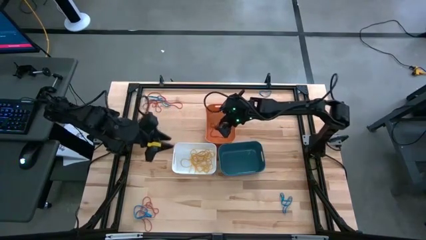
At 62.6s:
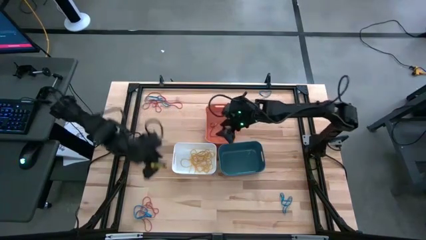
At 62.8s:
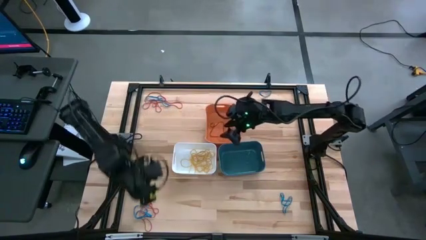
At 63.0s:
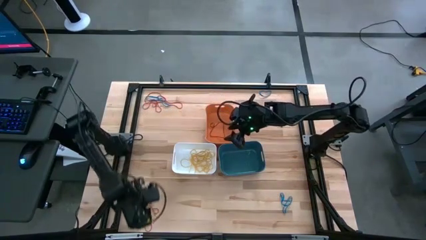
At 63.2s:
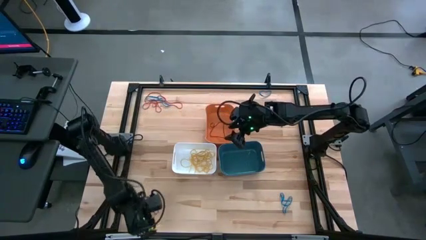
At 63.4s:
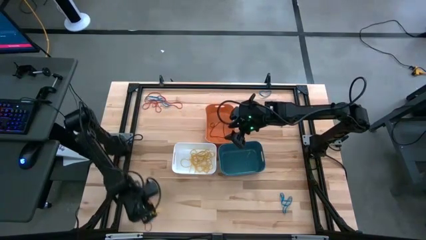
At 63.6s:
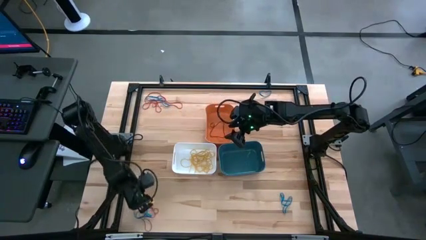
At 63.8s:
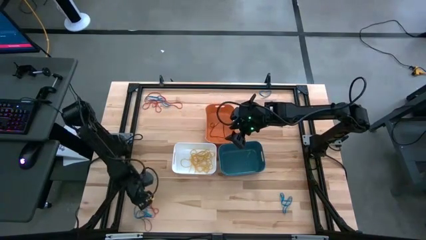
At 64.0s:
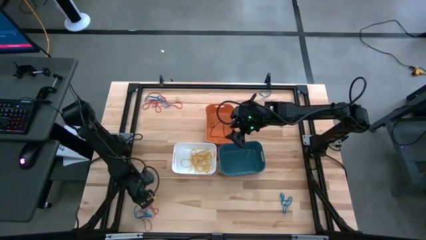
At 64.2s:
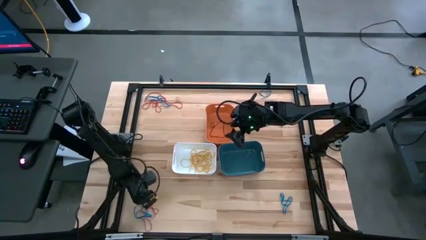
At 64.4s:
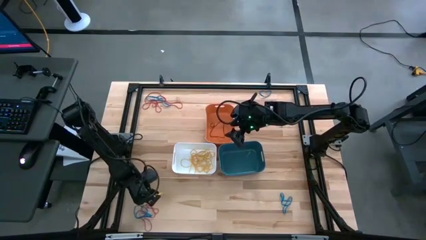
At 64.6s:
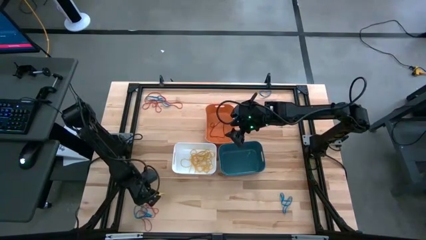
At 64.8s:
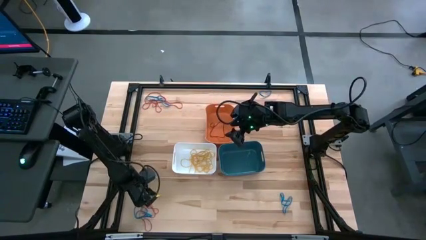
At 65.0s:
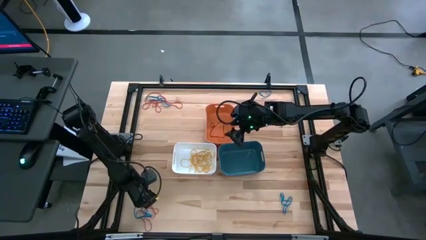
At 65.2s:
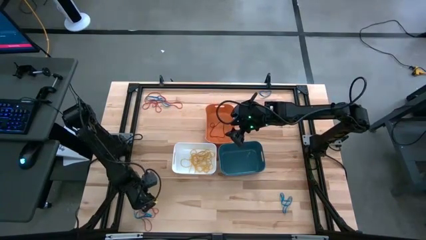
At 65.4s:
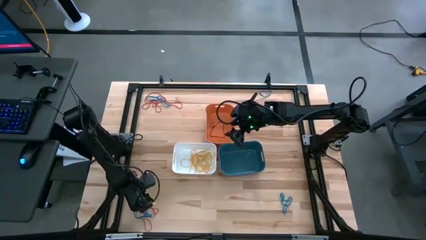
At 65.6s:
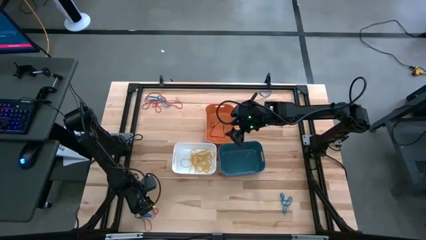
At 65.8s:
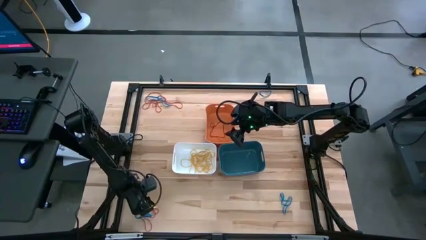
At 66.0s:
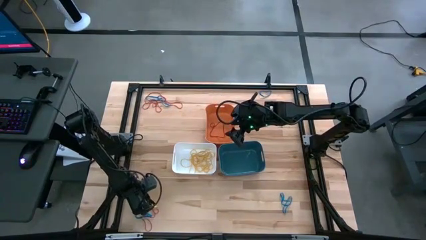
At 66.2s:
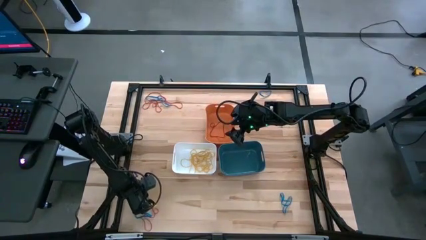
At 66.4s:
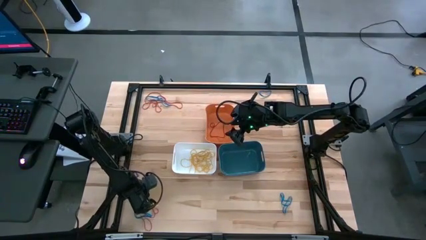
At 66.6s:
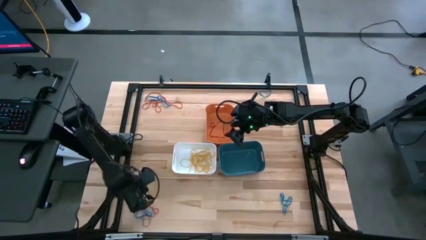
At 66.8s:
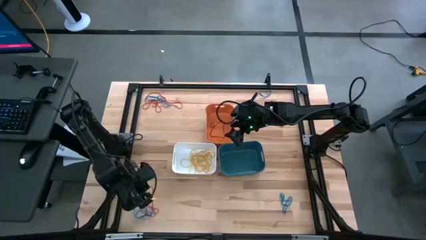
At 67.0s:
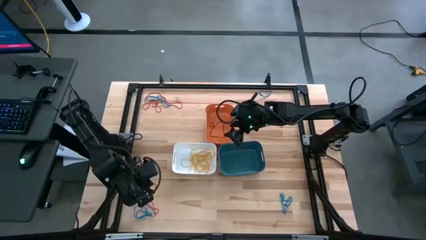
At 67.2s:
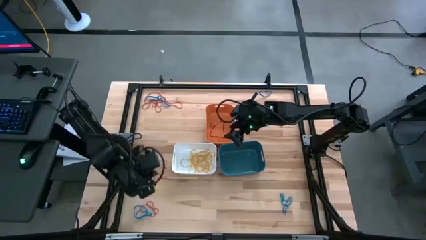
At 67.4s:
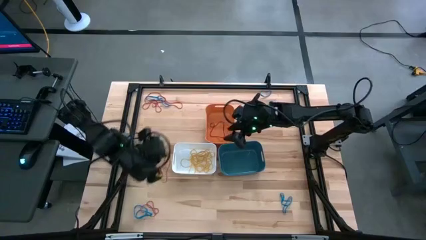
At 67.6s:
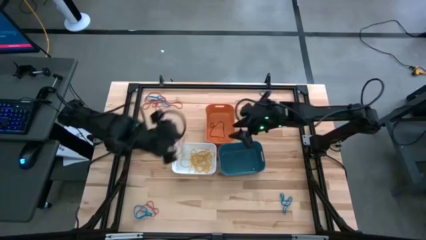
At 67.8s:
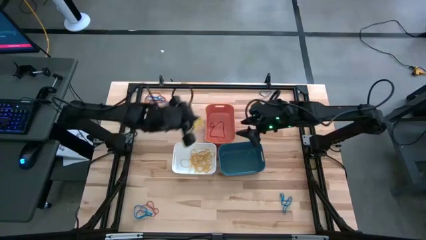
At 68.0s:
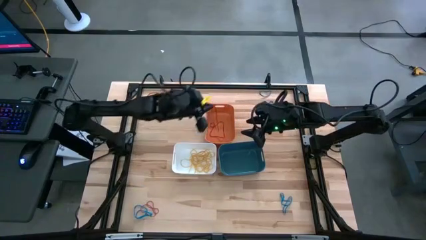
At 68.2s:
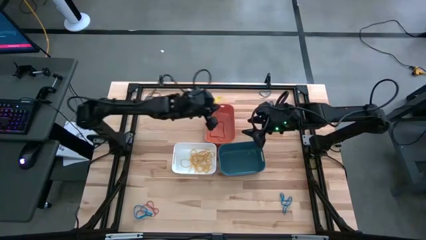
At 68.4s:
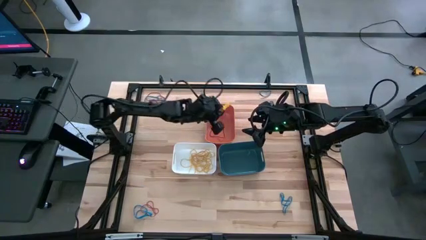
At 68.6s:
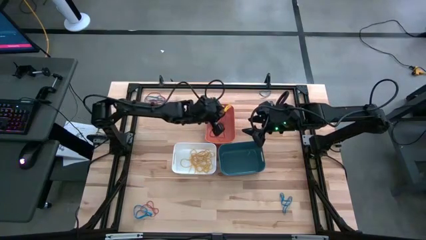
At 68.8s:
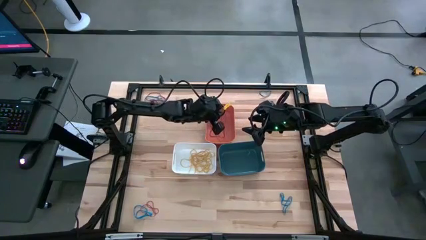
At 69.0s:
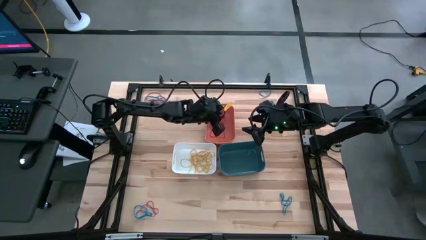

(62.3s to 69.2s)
Task: Sort rubber bands into baskets
Put the red rubber band into the orange bin

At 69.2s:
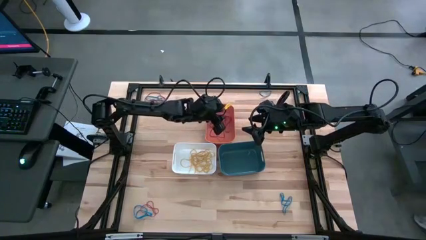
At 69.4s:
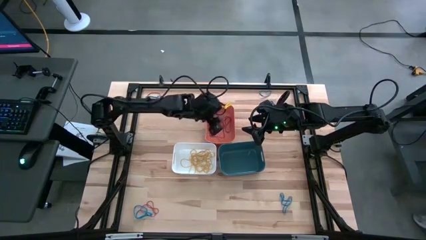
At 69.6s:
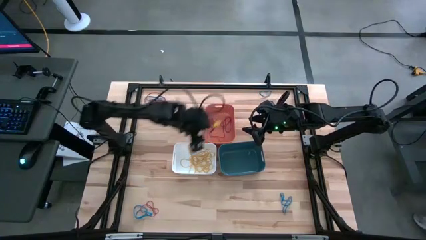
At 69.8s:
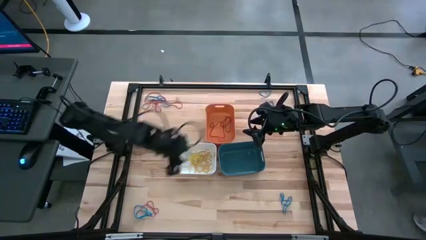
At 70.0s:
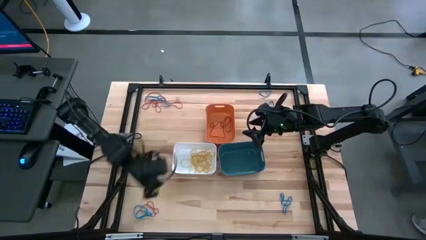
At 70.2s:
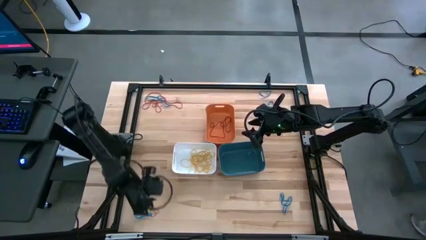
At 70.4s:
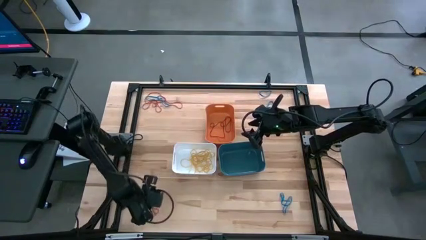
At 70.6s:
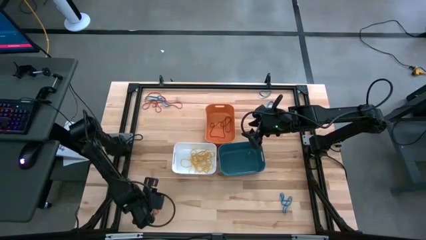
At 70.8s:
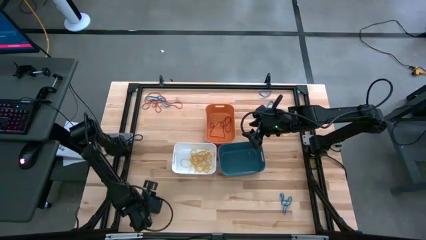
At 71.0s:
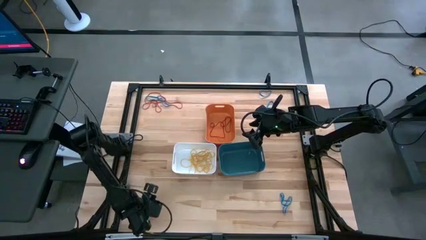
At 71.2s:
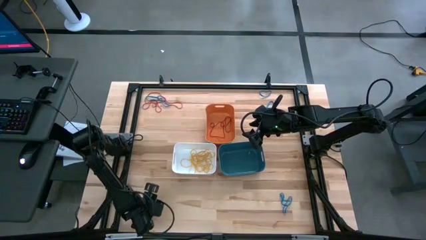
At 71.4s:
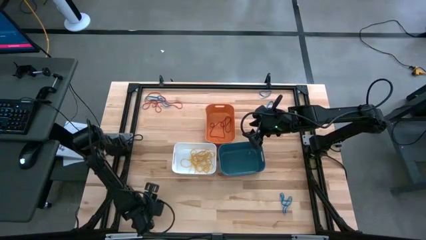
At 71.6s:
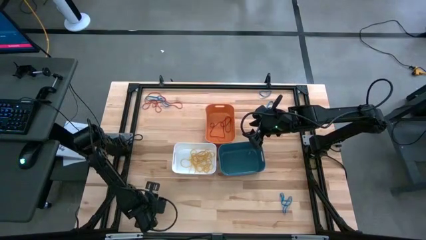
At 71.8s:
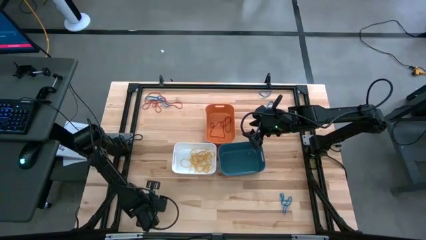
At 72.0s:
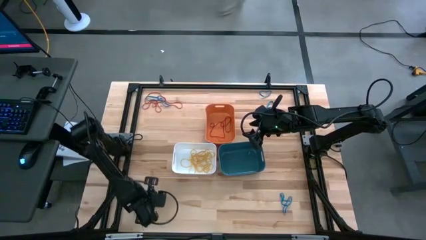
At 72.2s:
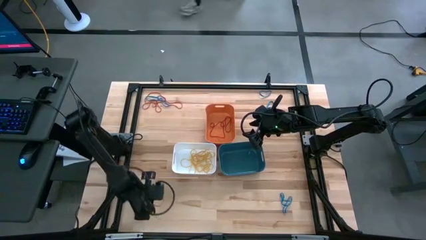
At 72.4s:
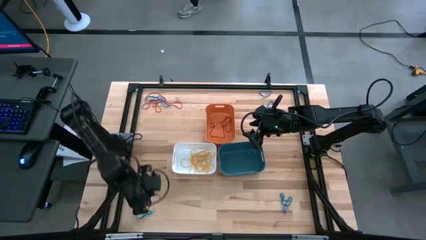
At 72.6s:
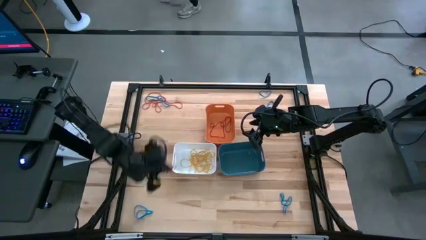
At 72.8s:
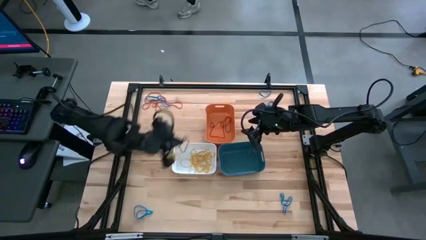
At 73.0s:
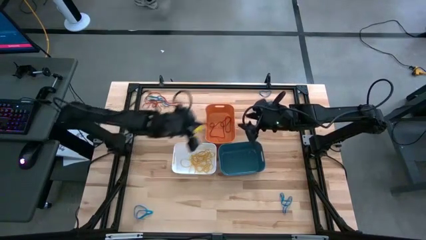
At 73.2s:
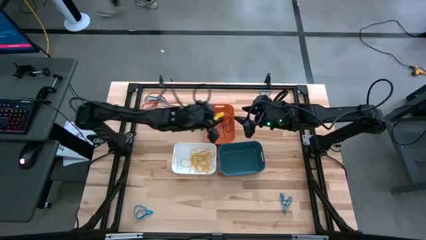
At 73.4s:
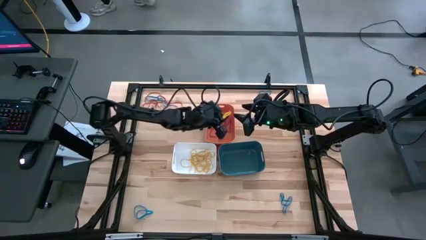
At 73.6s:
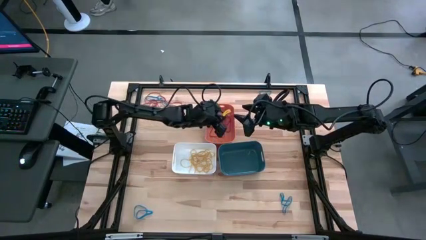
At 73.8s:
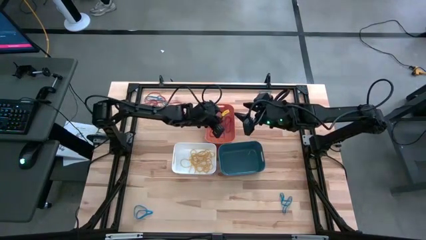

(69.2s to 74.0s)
Put the red rubber band into the orange bin

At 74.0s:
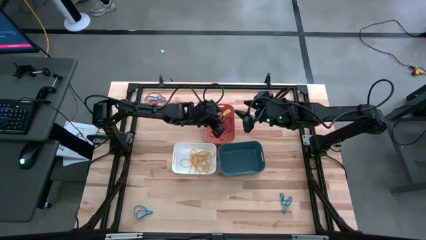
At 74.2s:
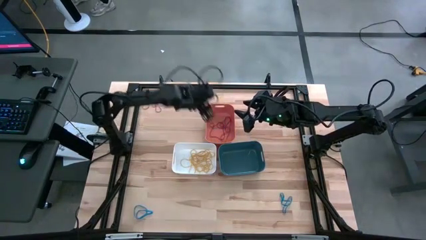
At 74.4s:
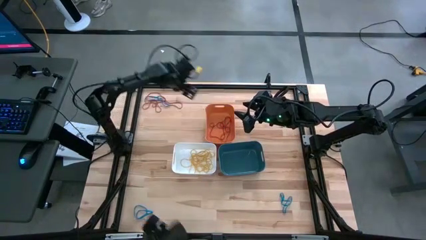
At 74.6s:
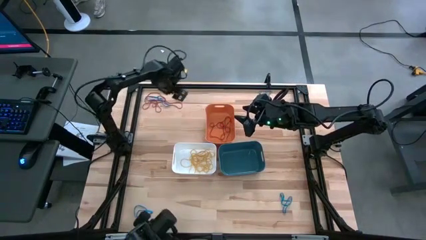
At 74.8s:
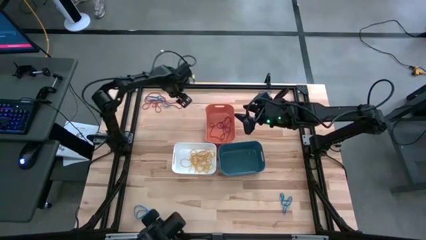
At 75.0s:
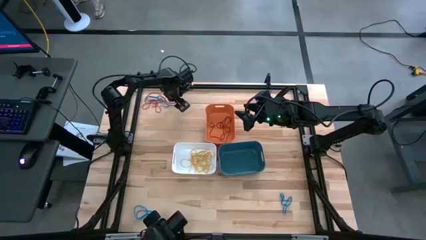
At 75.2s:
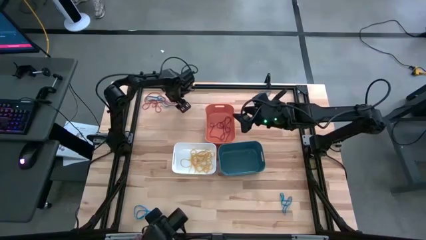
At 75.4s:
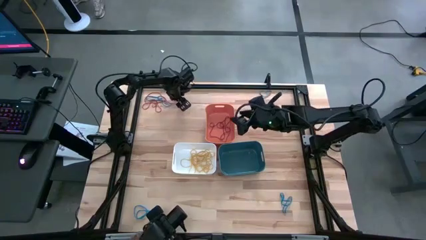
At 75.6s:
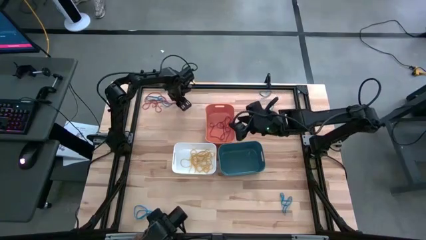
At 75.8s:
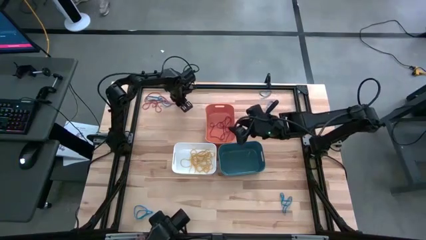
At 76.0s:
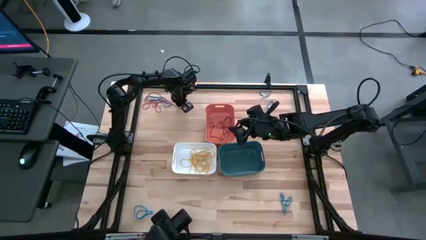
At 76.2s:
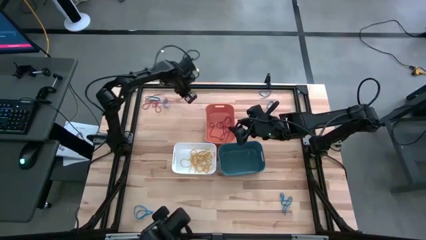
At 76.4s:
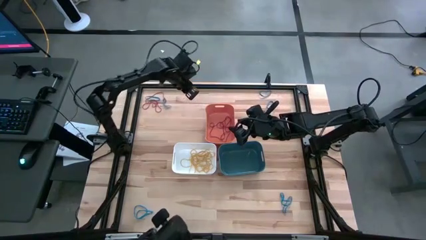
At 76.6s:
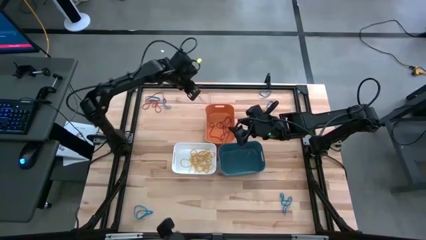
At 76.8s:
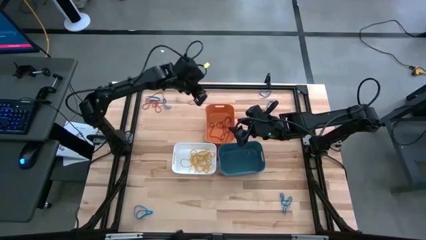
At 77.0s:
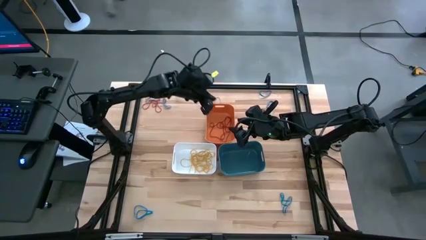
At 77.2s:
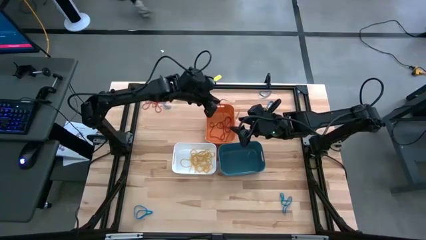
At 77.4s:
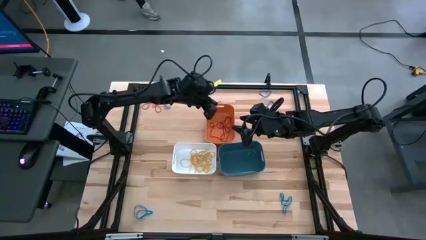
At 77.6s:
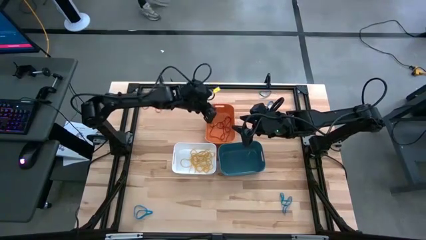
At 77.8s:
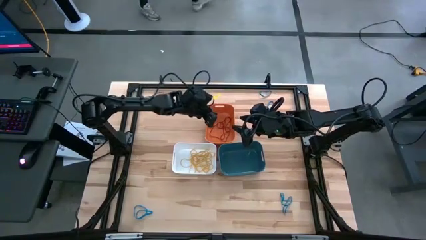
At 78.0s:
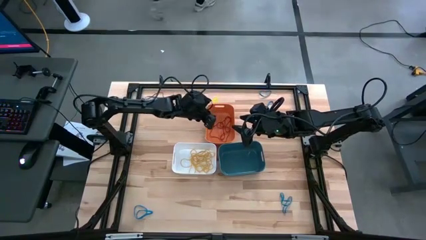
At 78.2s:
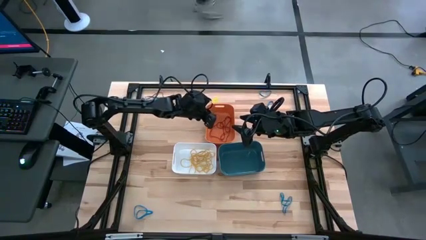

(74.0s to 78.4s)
Put the red rubber band into the orange bin

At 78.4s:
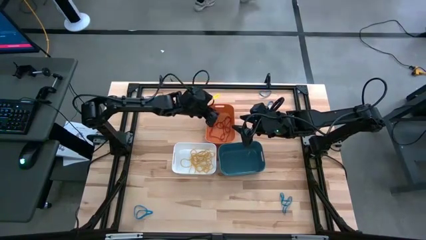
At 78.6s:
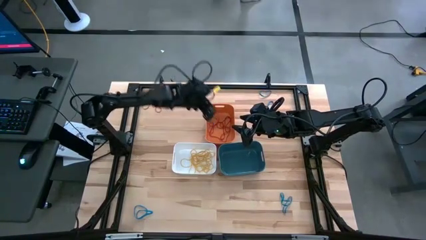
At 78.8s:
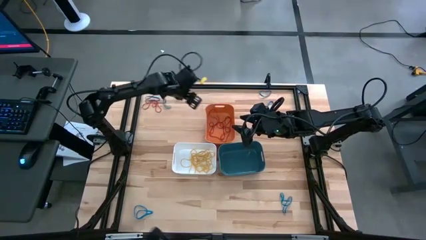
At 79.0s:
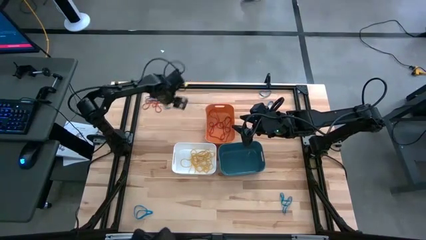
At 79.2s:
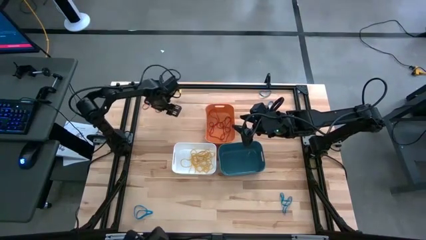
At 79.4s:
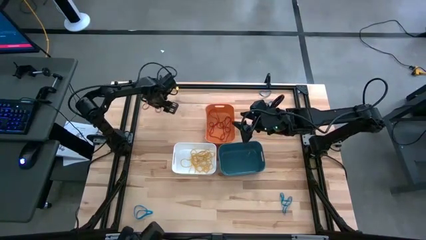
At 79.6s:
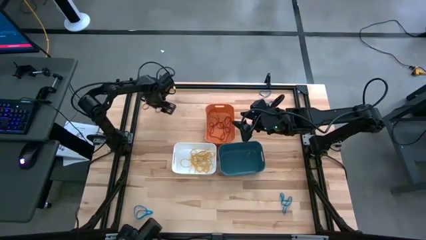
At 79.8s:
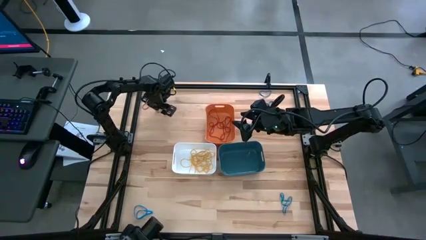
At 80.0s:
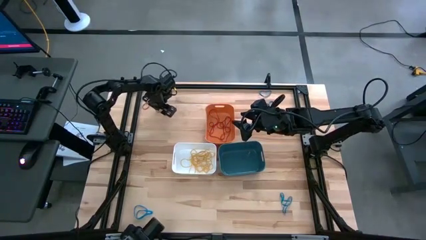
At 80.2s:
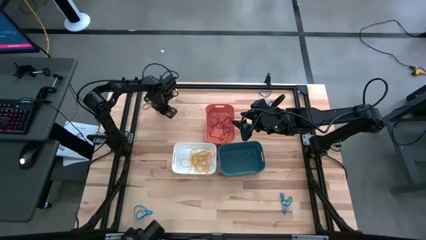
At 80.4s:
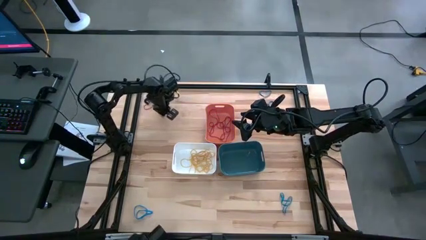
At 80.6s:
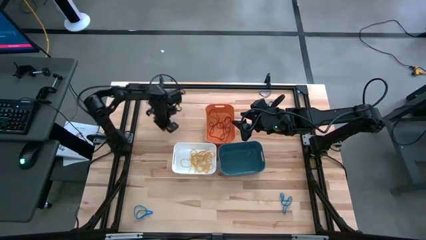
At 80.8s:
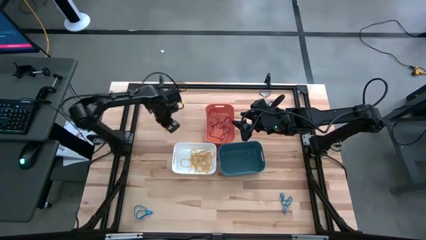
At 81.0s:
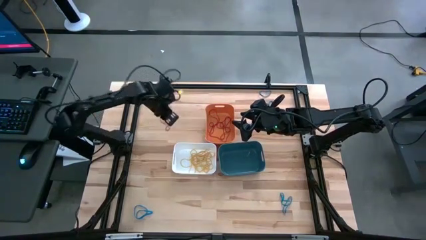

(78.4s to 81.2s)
Put the red rubber band into the orange bin
